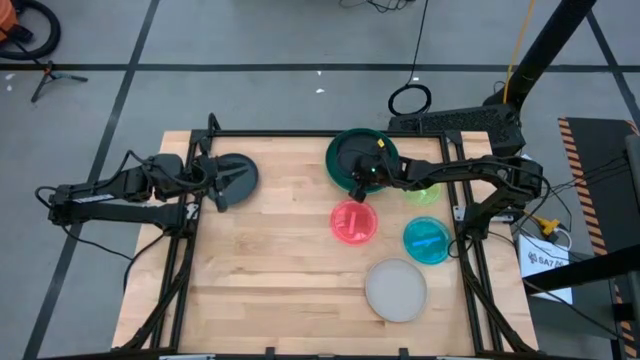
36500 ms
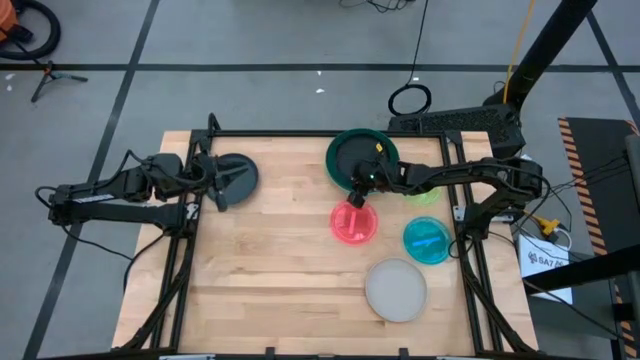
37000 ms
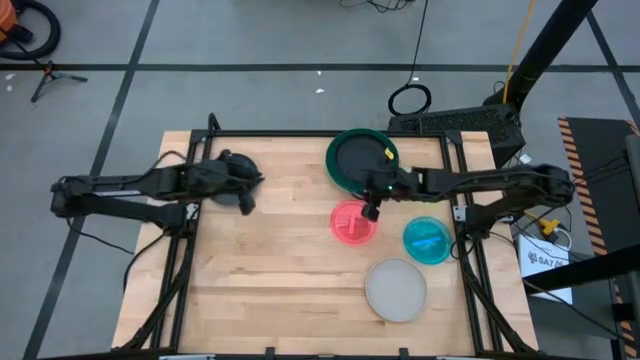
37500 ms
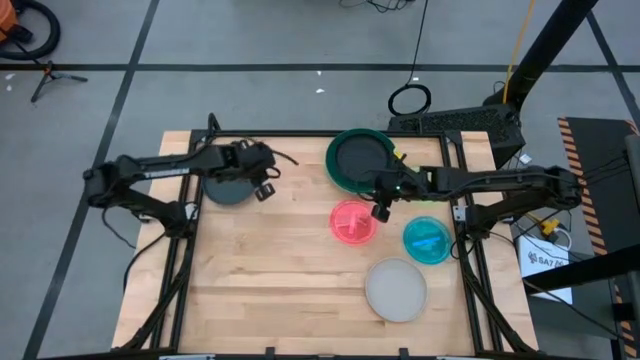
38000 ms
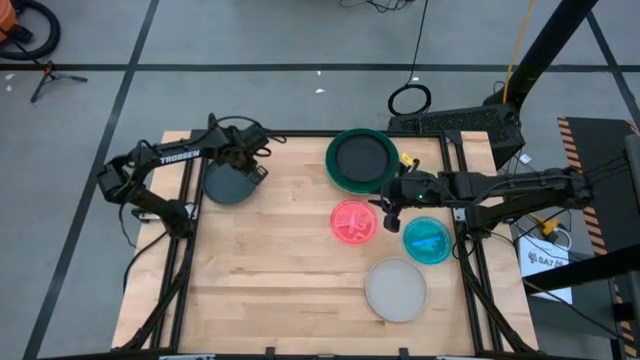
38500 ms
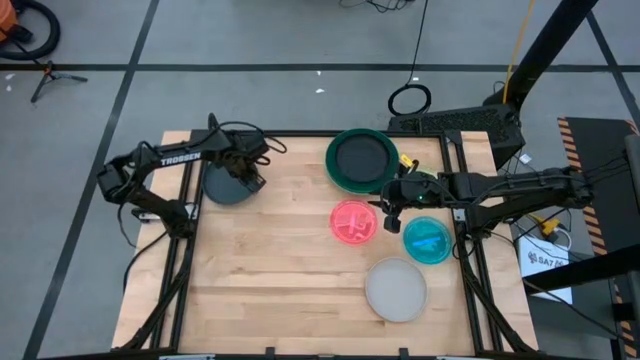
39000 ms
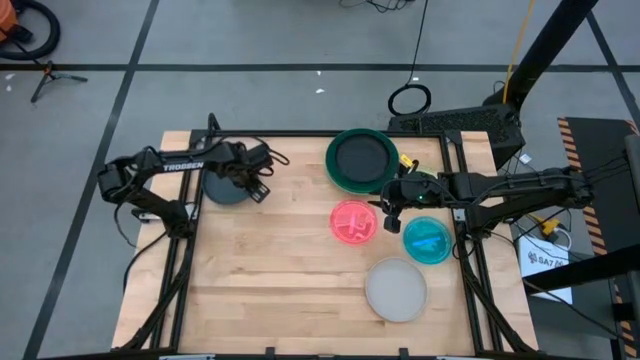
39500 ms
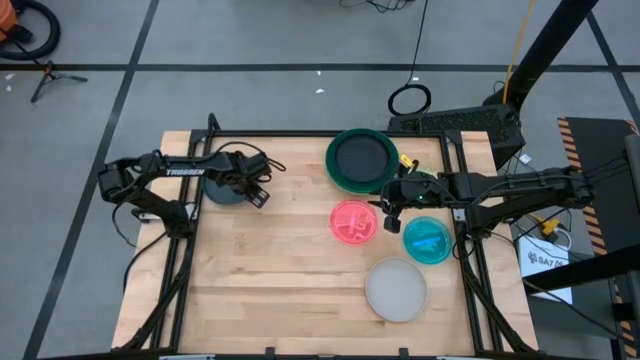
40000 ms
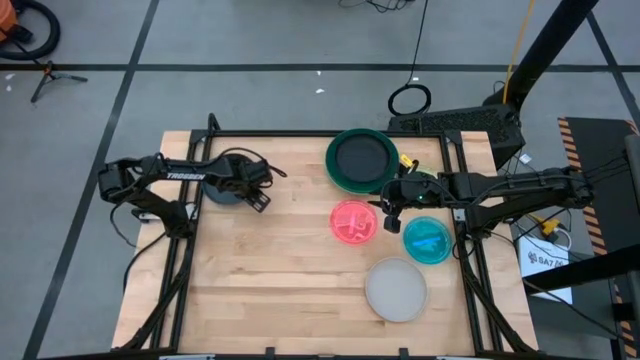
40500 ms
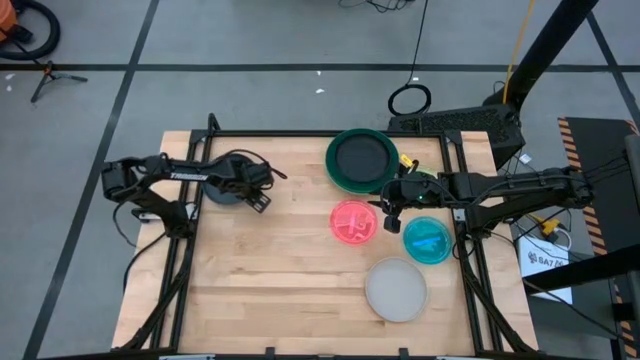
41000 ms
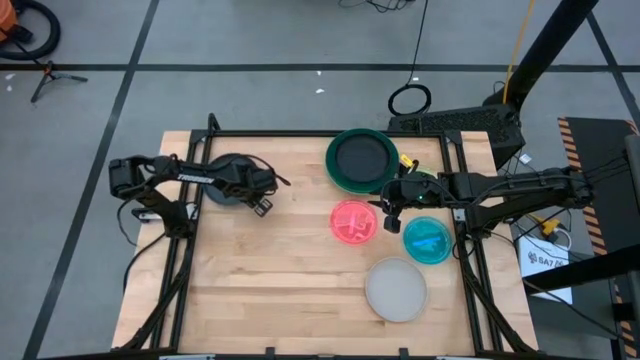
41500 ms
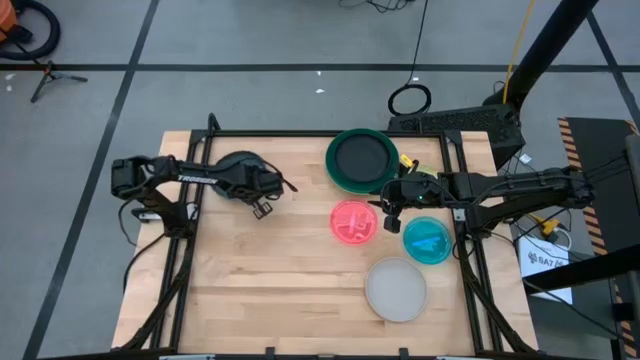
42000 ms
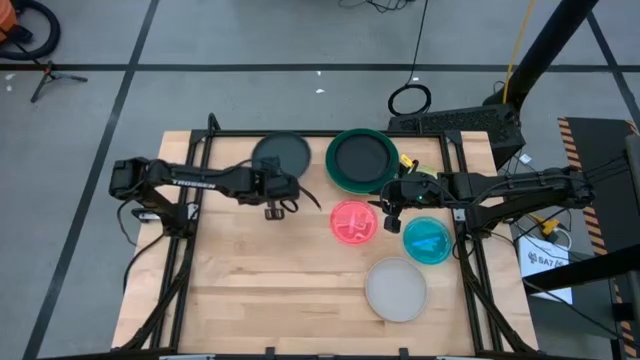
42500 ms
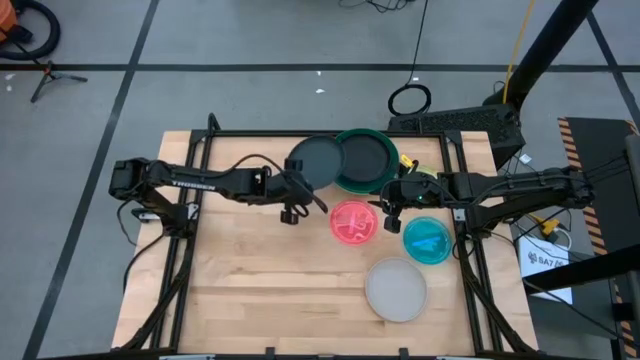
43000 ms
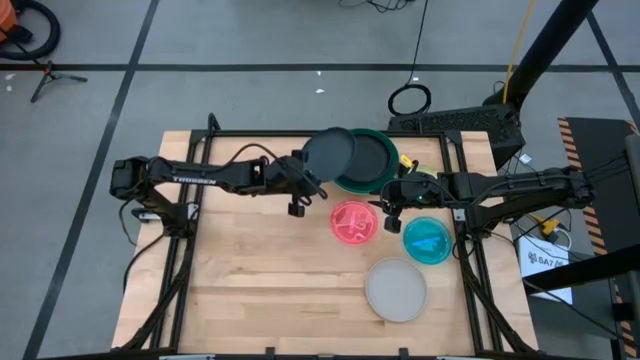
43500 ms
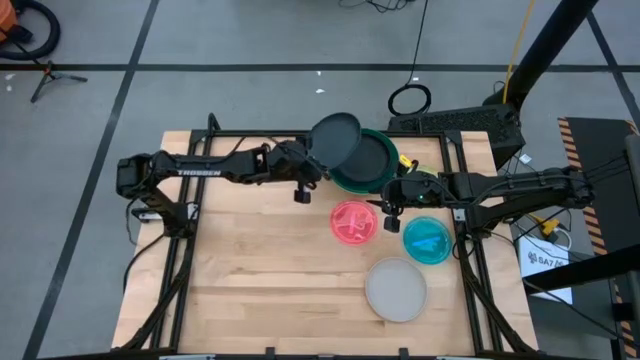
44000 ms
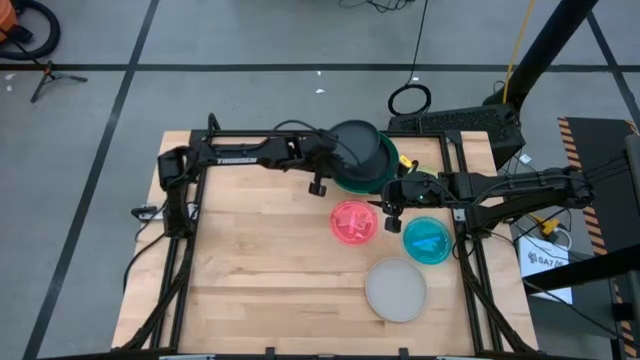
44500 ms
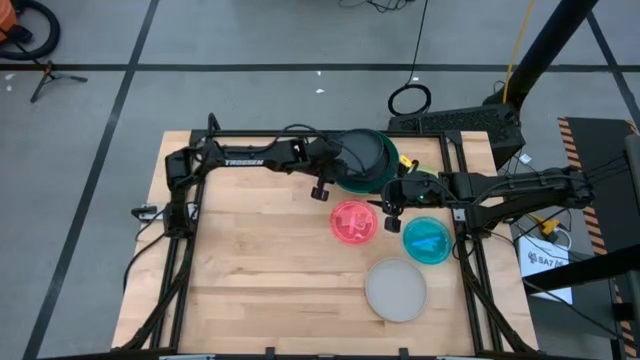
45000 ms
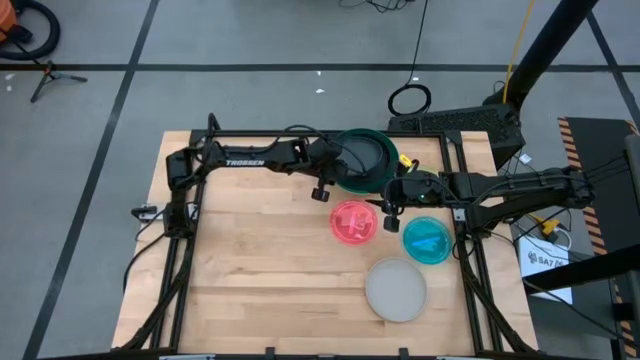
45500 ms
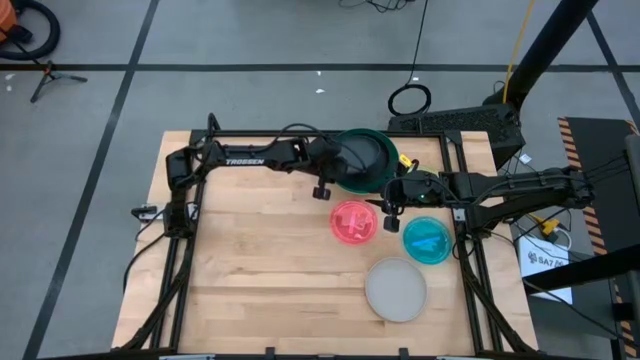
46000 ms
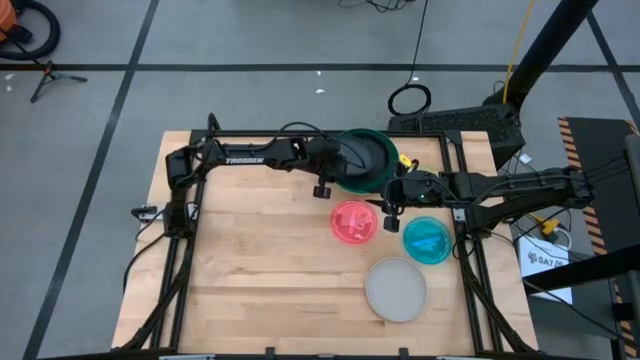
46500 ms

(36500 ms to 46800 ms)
Task: Stack plastic plates
Stack the black plate on top of the black plate

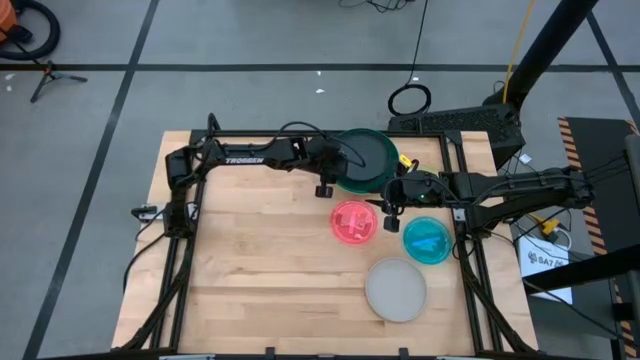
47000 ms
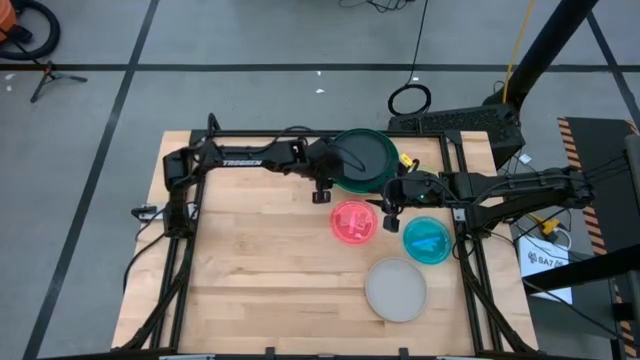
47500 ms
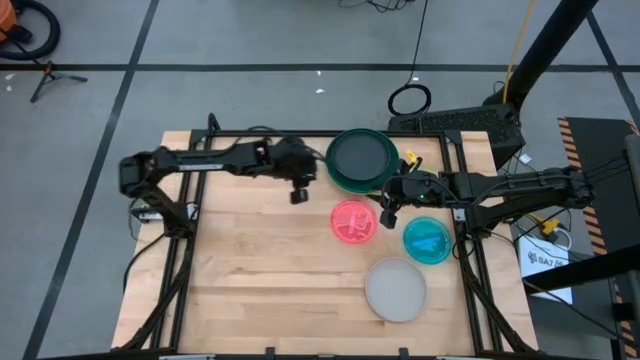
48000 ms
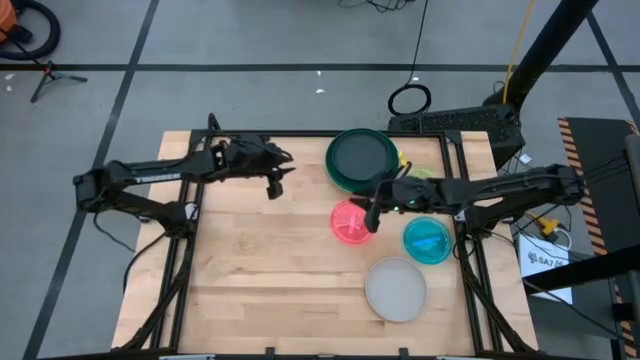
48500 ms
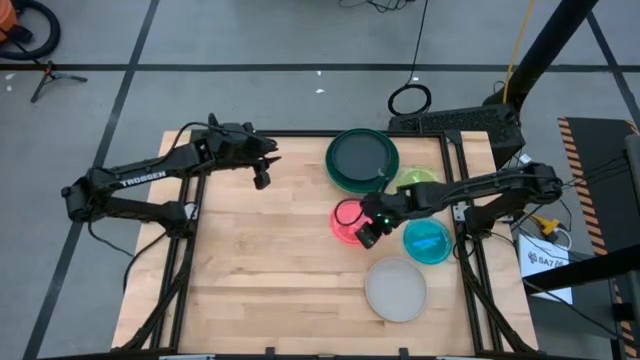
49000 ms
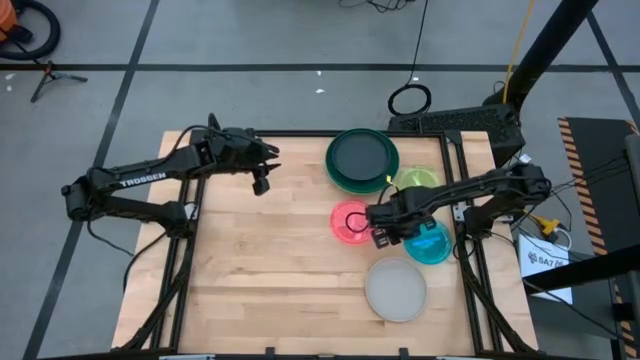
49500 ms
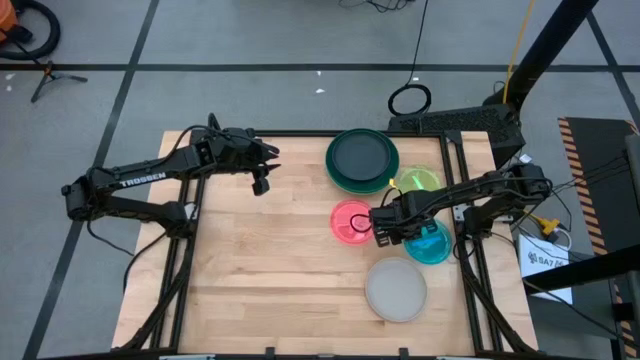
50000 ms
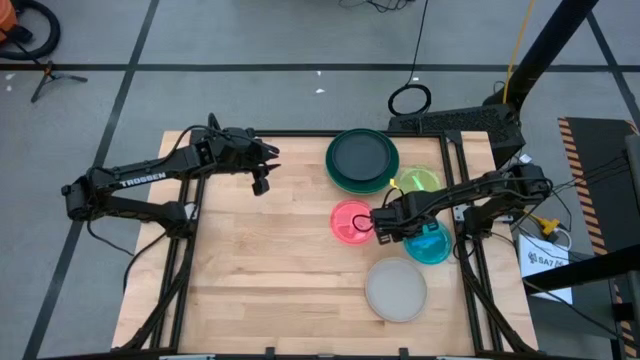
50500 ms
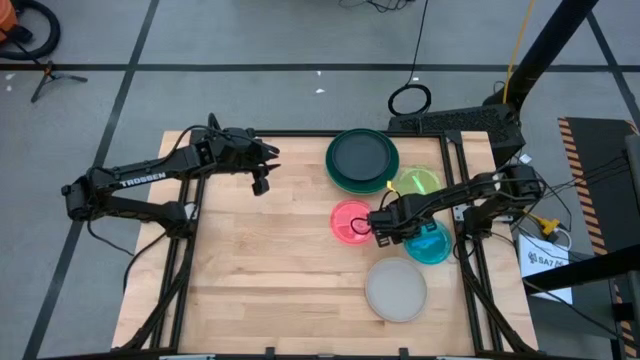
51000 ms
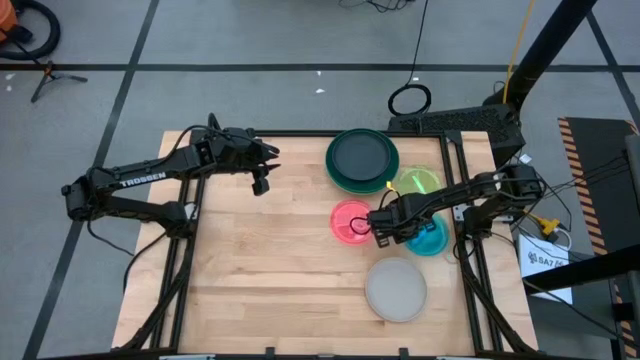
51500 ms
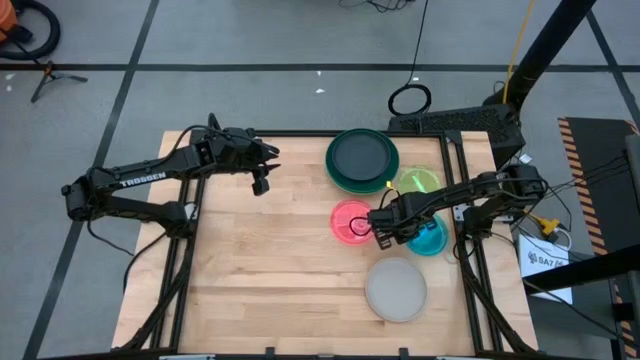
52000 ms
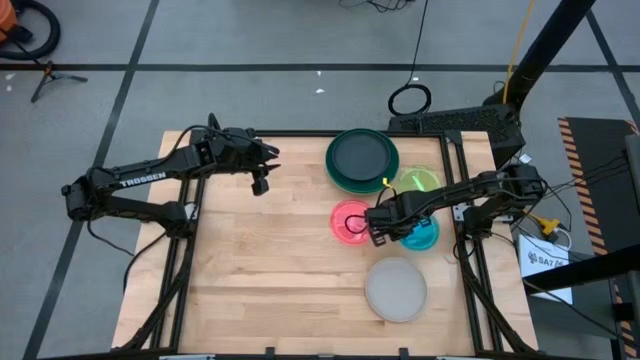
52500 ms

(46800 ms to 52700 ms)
Stack the blue plate on top of the black plate

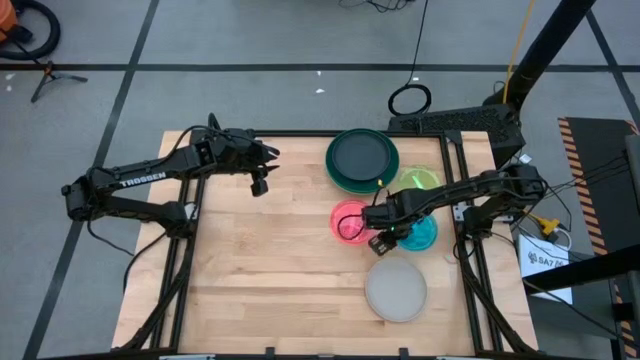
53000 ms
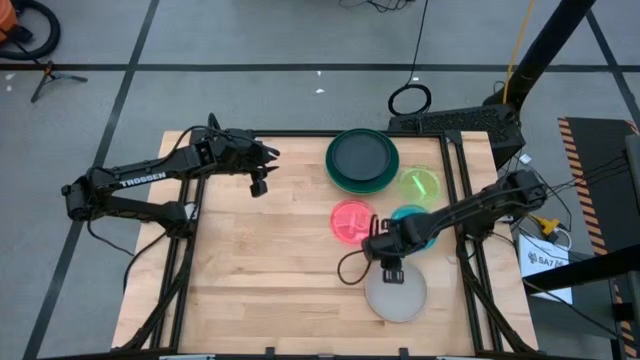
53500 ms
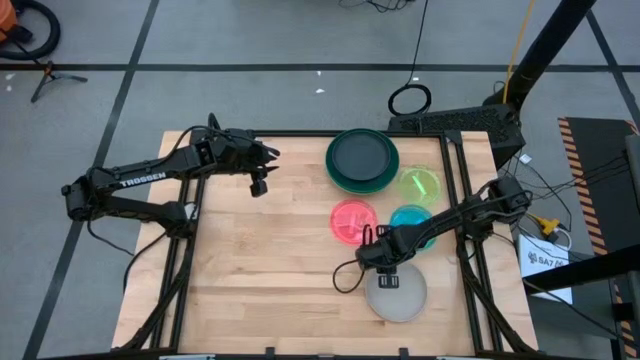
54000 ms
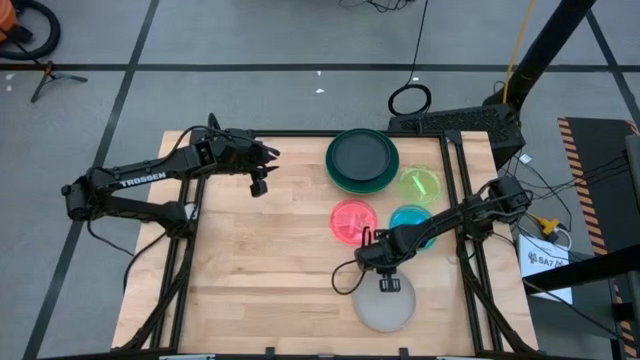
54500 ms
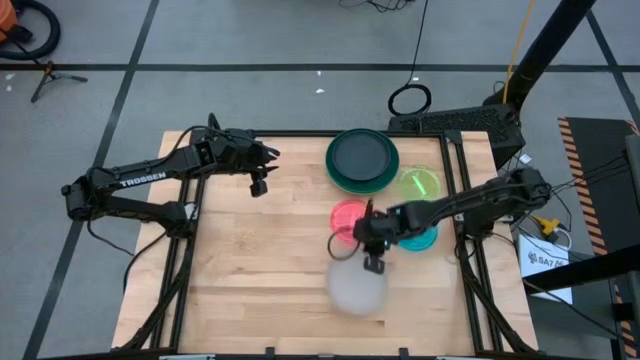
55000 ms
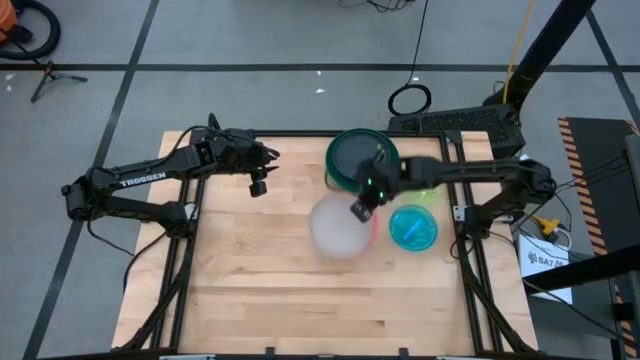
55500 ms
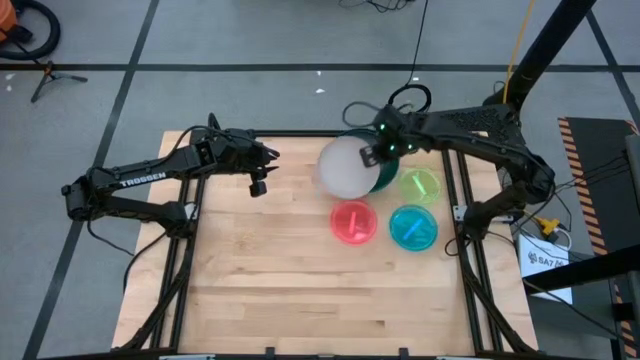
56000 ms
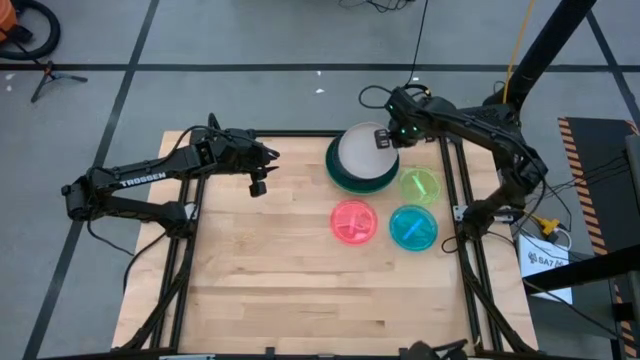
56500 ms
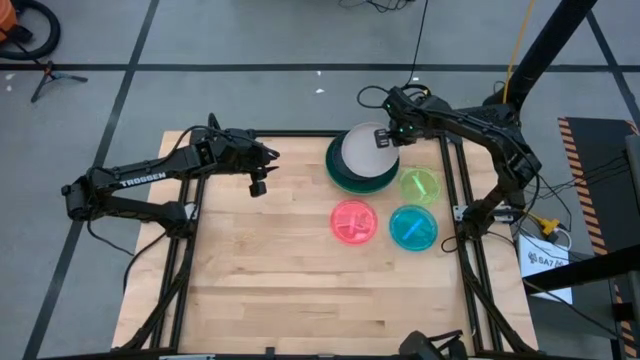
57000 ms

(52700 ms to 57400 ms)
Stack the gray plate on top of the black plate

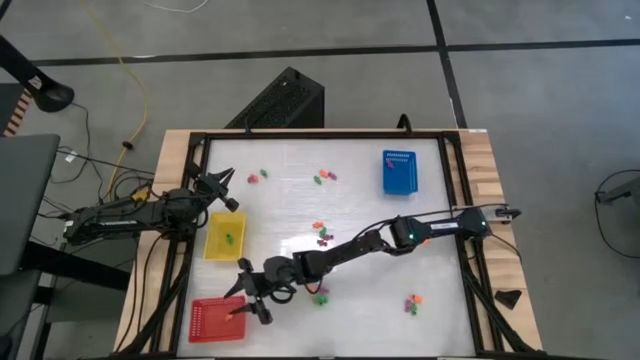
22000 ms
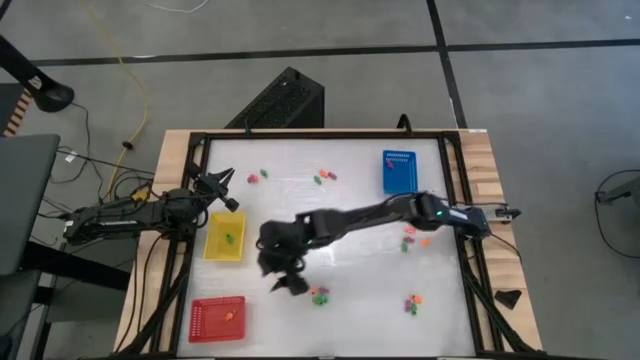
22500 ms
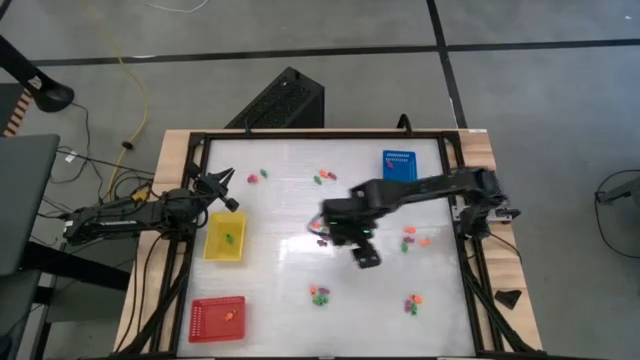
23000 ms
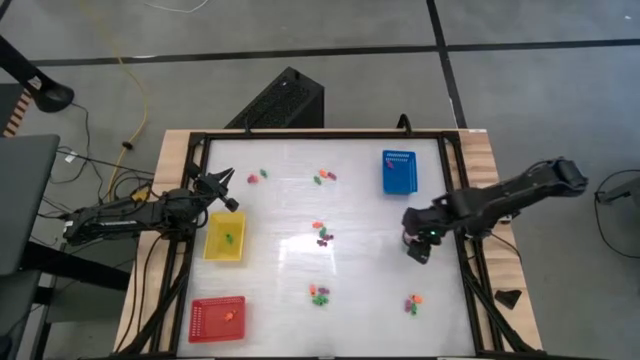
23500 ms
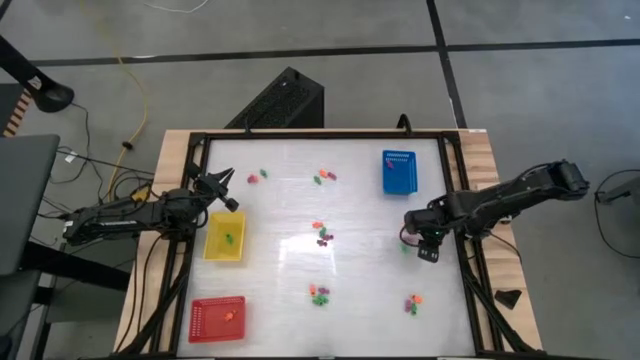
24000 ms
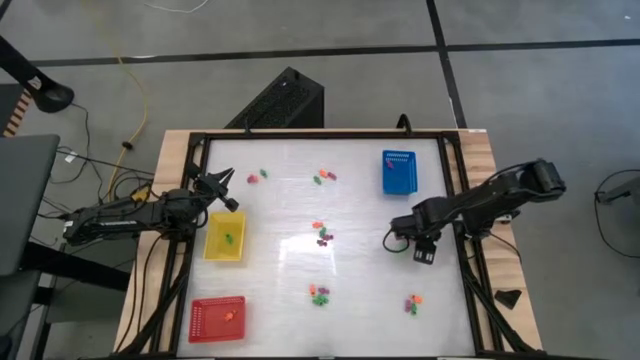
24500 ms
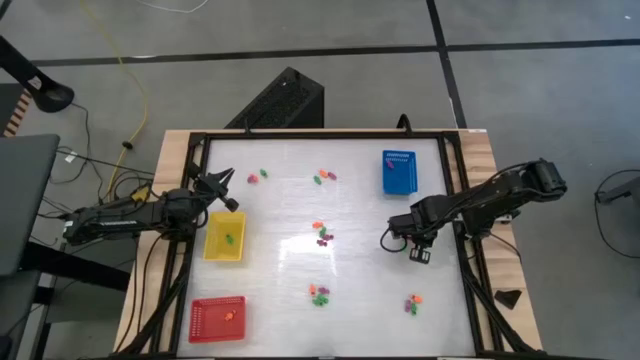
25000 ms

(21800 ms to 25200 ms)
Task: Sort Halloween decoration
Put the orange skeleton toy into the red bin
